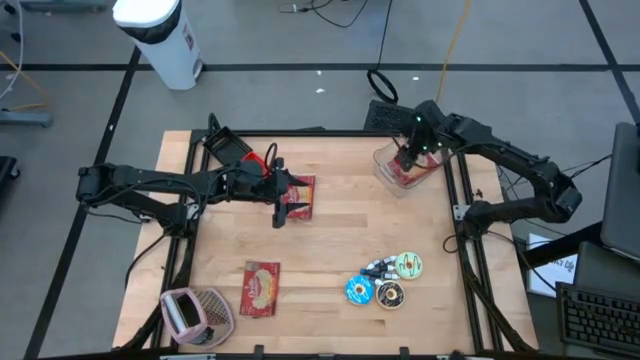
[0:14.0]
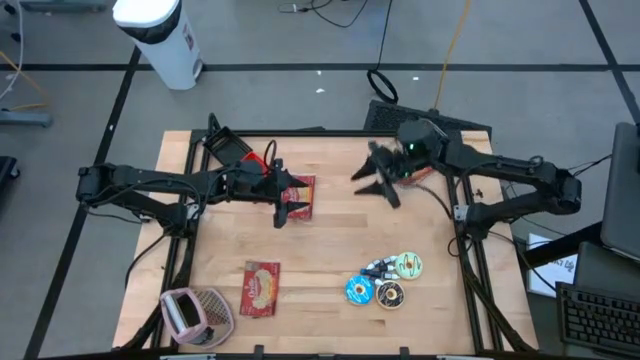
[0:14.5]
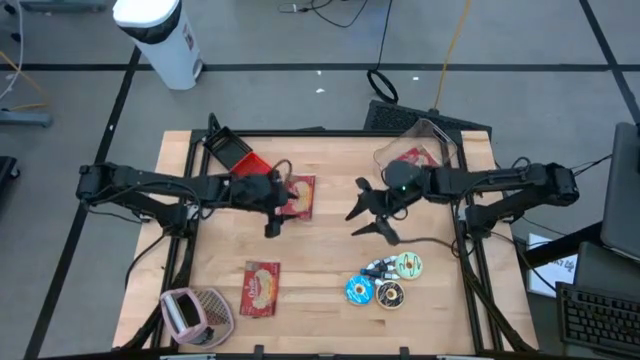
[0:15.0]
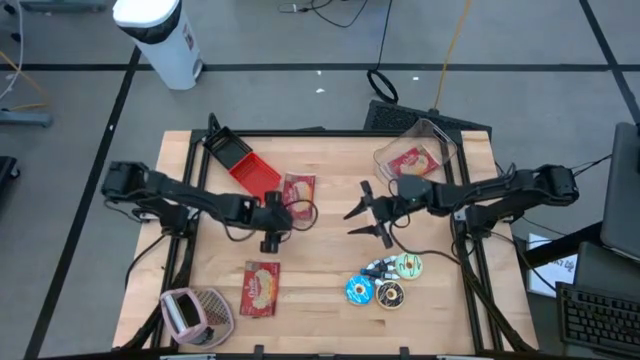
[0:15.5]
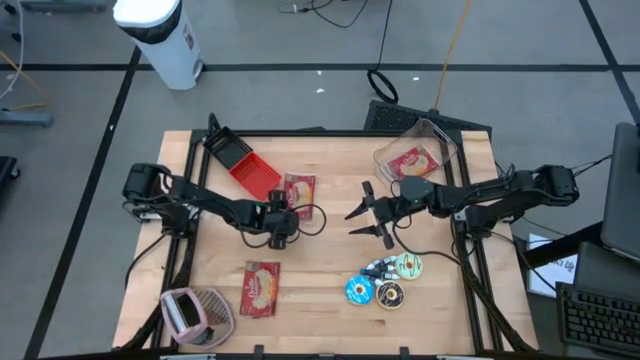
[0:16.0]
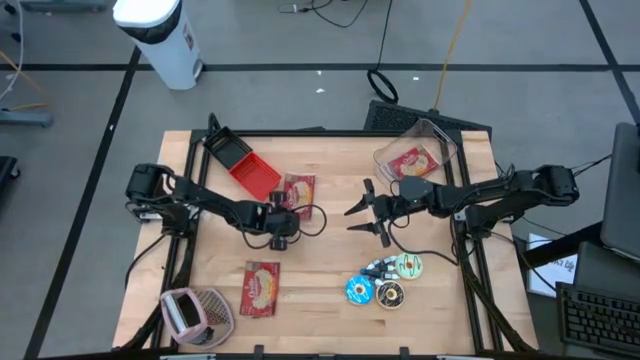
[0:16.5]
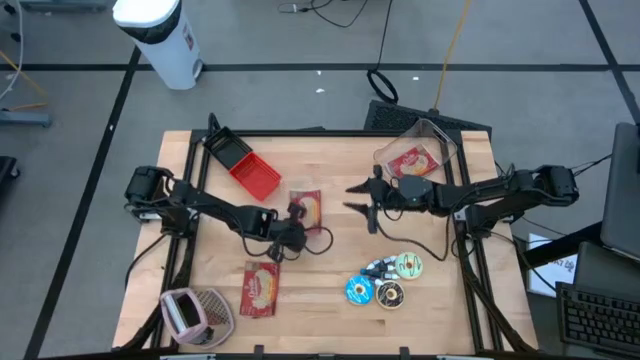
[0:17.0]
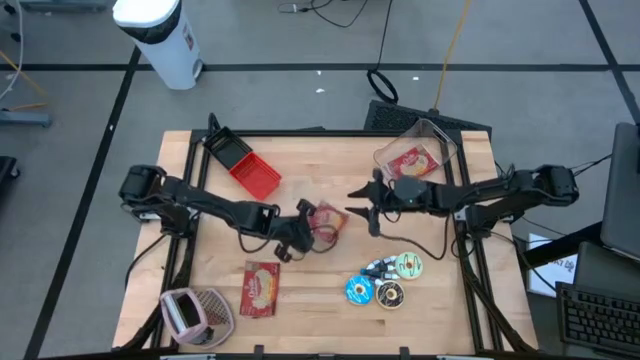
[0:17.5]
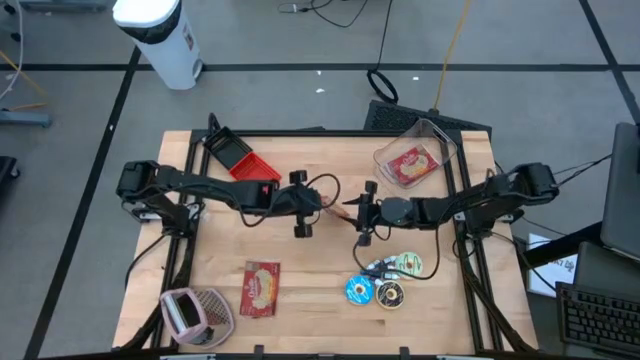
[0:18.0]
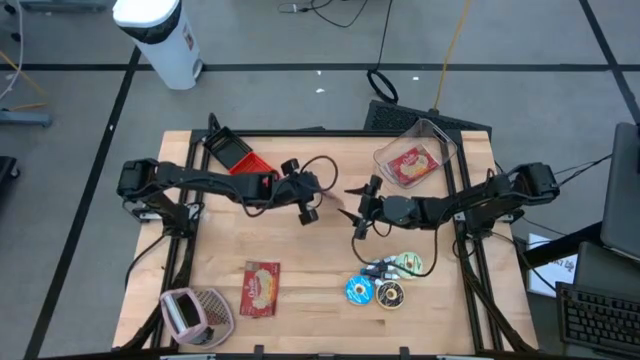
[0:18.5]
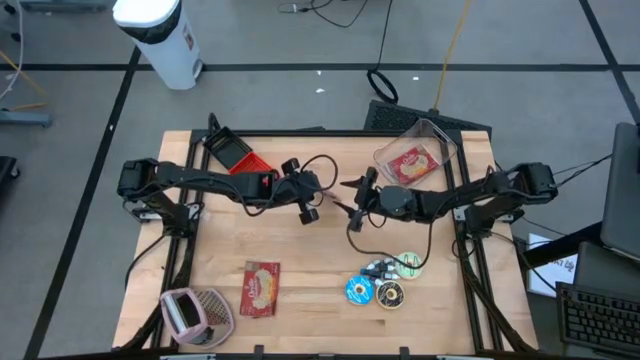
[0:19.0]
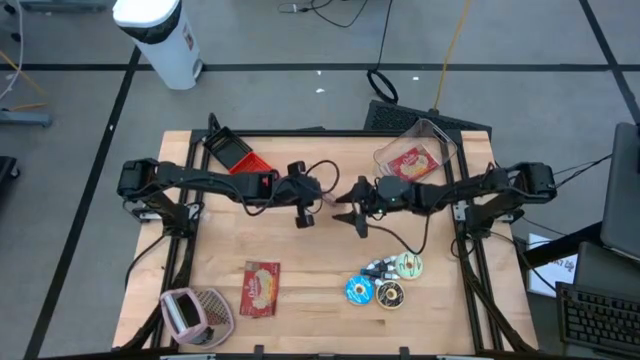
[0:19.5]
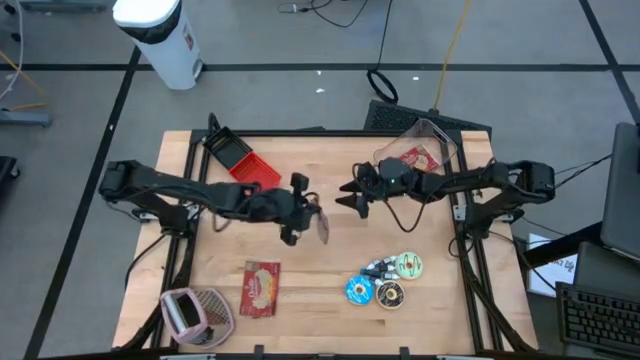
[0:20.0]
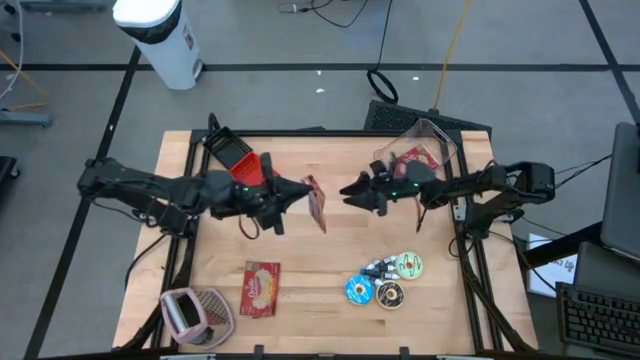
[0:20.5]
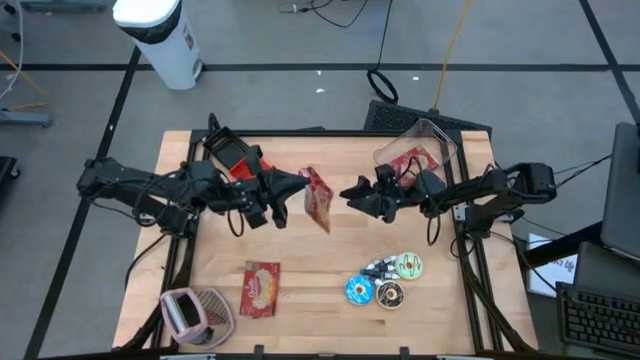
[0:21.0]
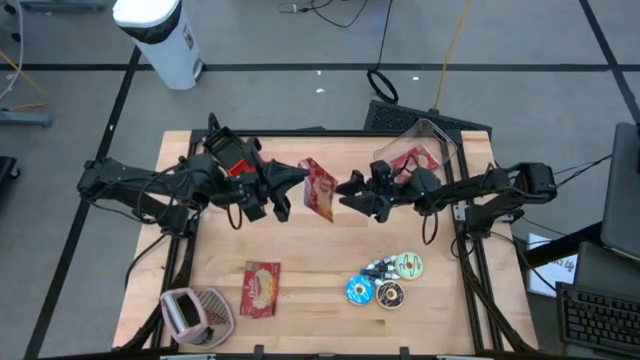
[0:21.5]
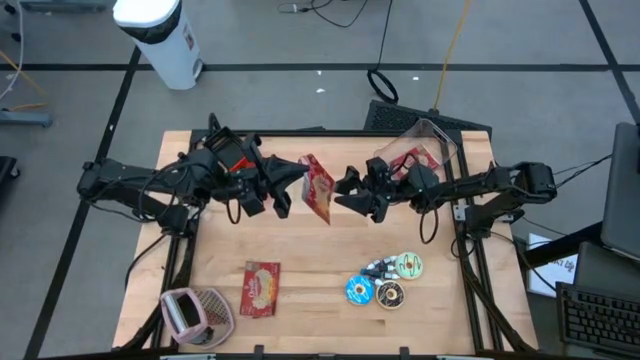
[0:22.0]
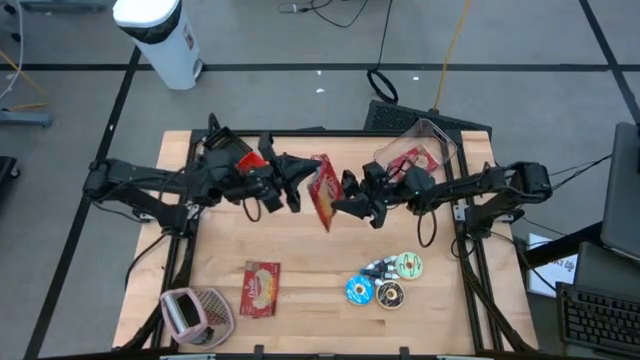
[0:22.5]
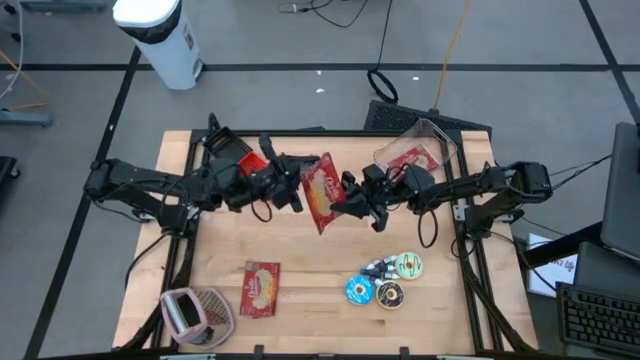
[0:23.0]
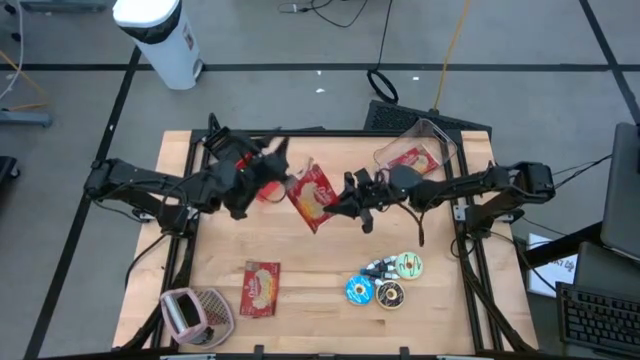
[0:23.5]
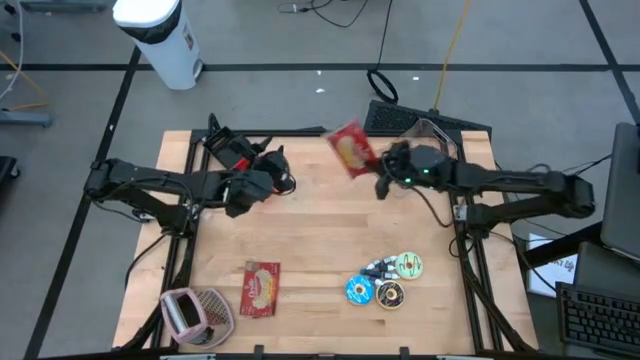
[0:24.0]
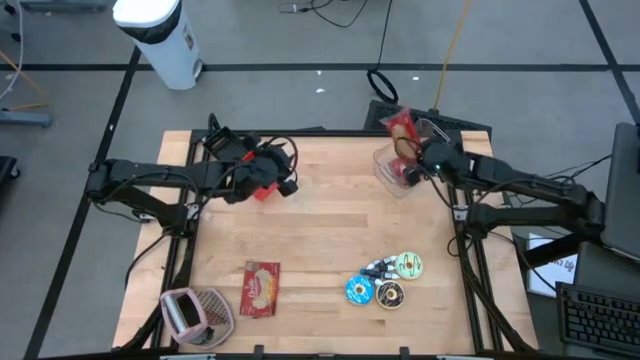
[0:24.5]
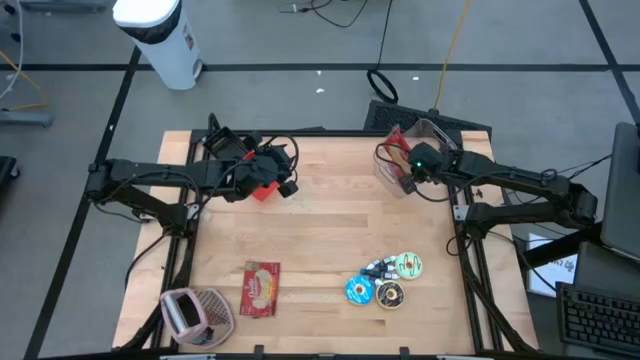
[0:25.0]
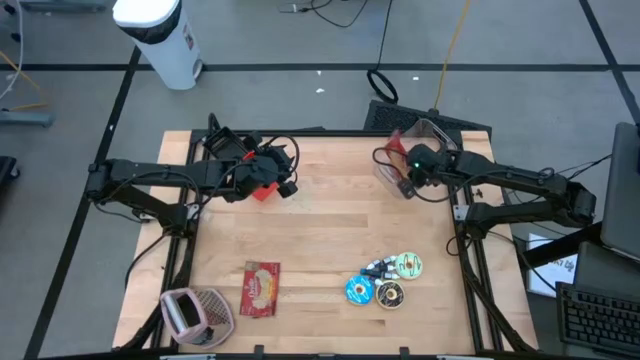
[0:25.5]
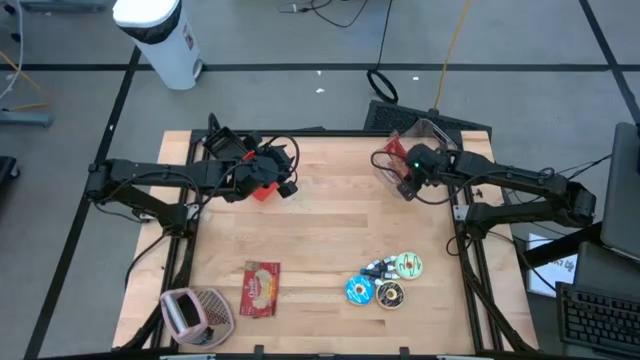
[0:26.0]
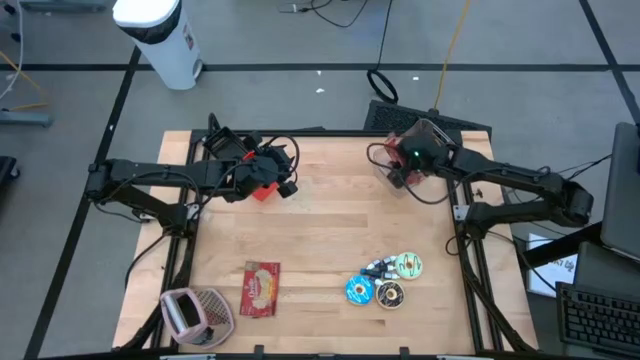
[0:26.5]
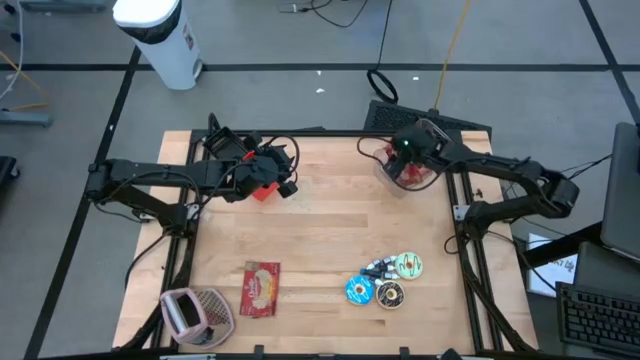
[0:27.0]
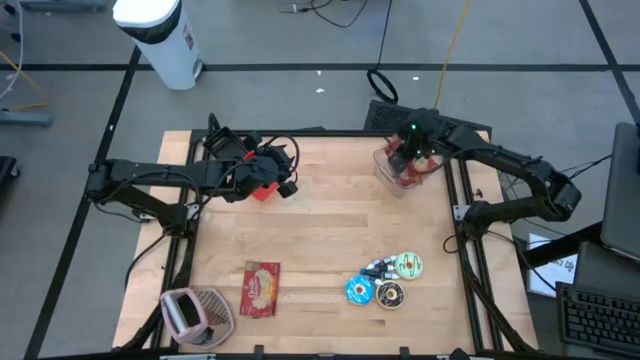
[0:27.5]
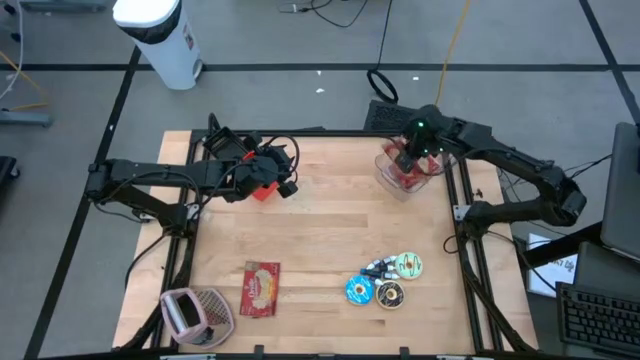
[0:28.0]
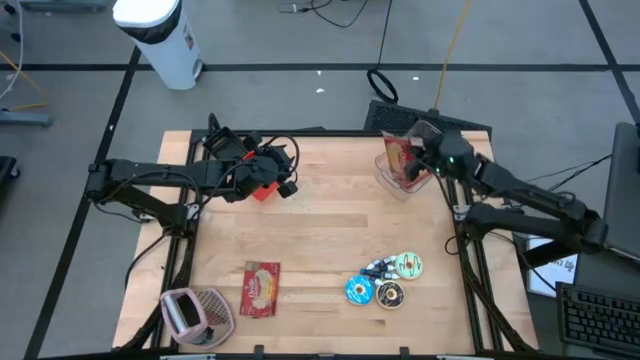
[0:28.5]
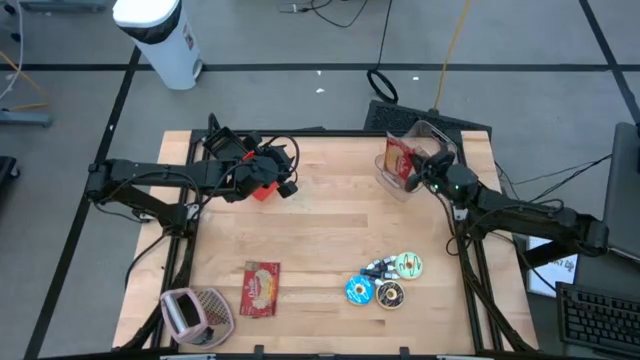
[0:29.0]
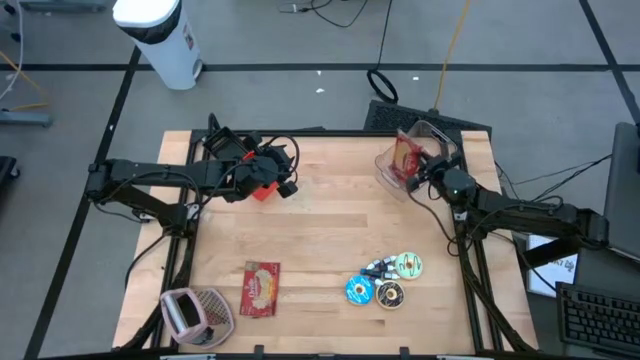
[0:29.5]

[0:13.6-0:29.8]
Put the top red popcorn bag into the transparent bin
